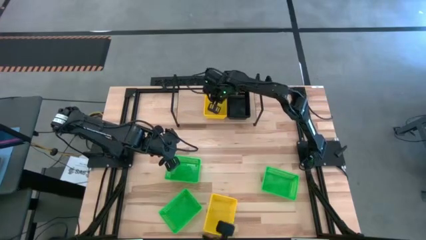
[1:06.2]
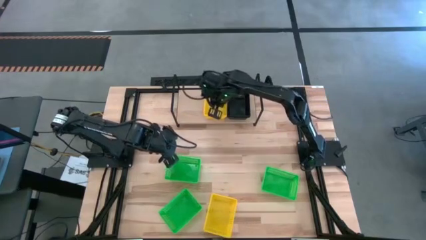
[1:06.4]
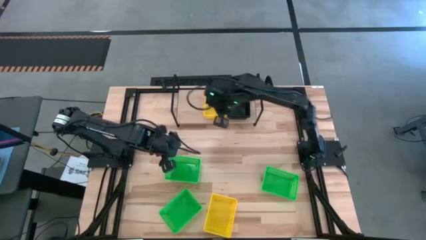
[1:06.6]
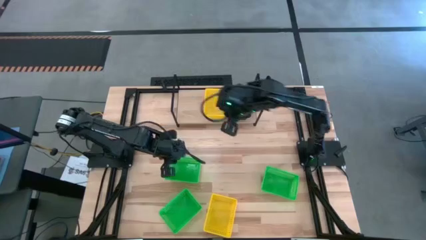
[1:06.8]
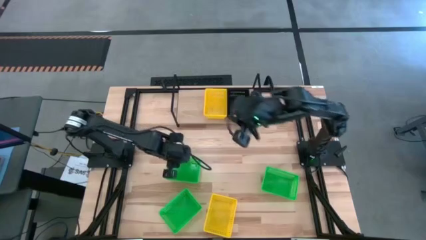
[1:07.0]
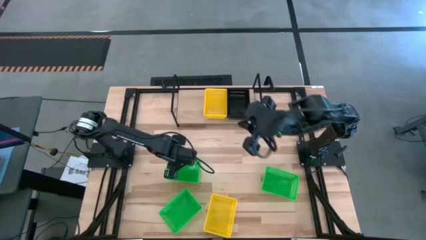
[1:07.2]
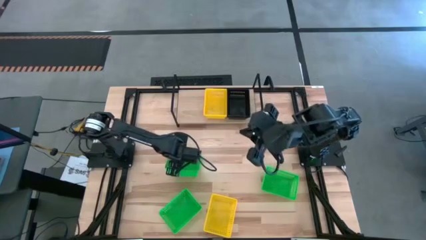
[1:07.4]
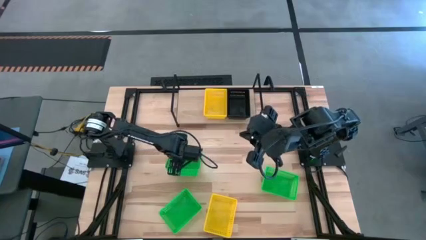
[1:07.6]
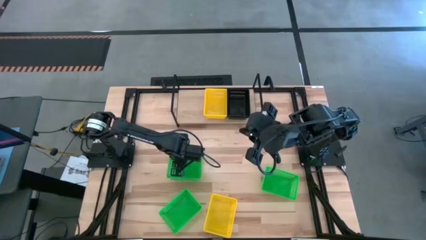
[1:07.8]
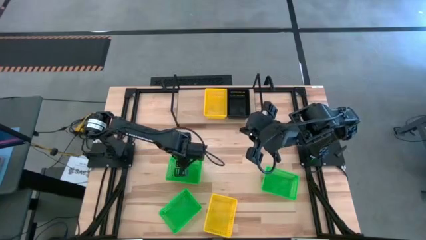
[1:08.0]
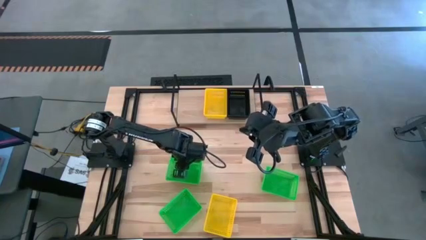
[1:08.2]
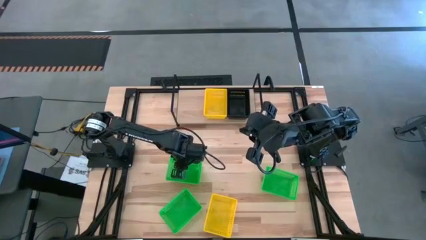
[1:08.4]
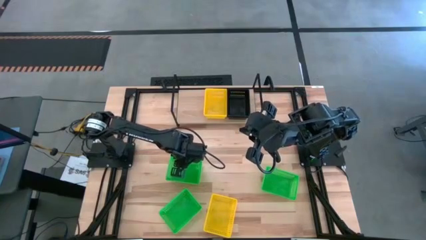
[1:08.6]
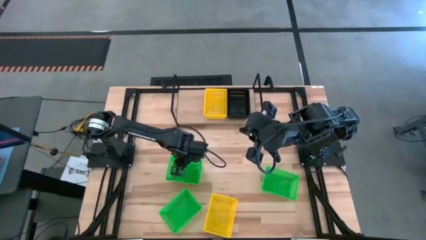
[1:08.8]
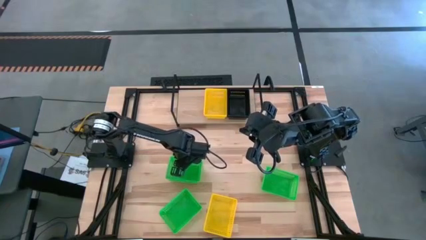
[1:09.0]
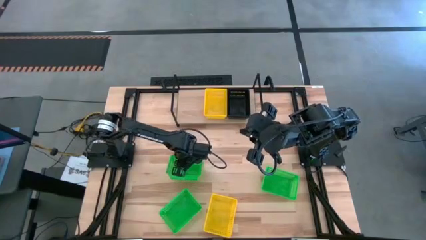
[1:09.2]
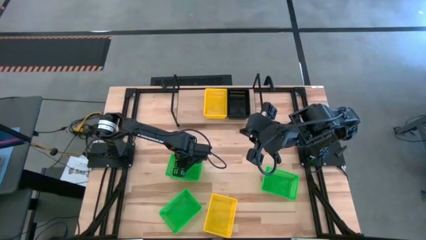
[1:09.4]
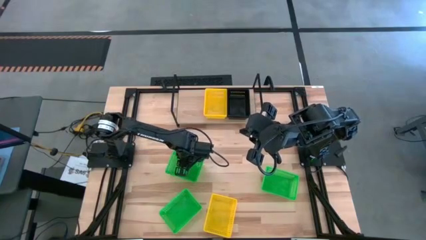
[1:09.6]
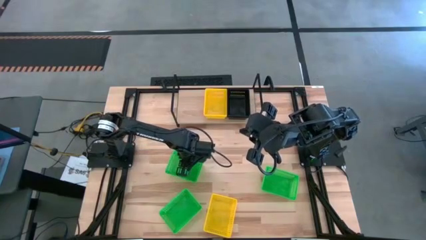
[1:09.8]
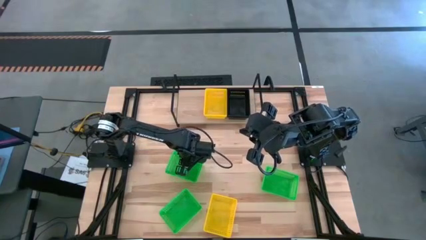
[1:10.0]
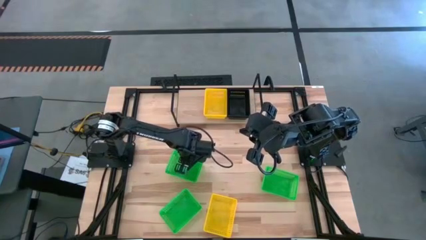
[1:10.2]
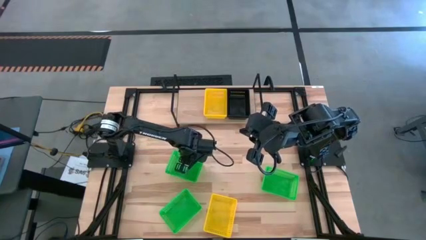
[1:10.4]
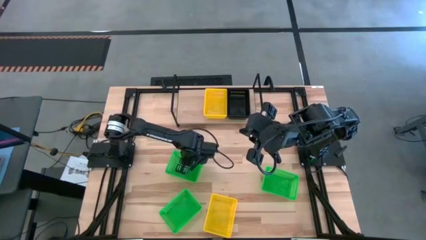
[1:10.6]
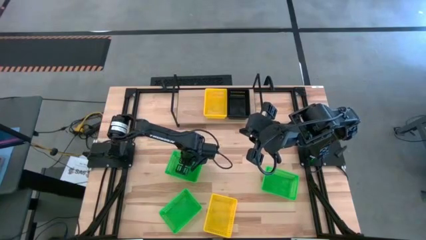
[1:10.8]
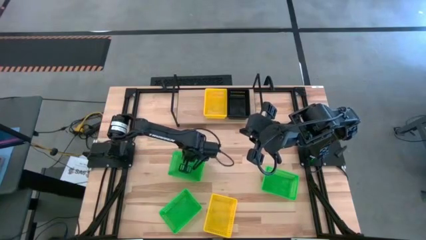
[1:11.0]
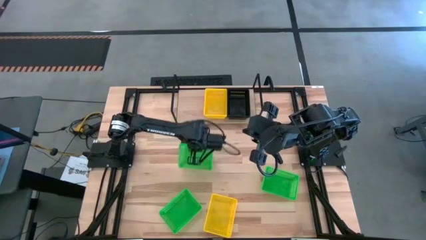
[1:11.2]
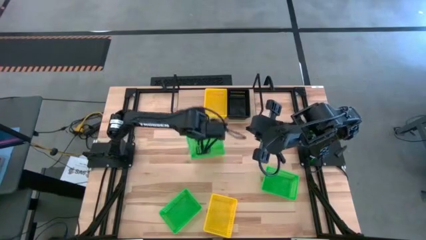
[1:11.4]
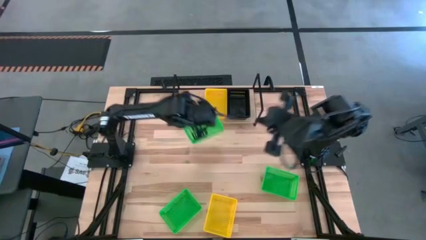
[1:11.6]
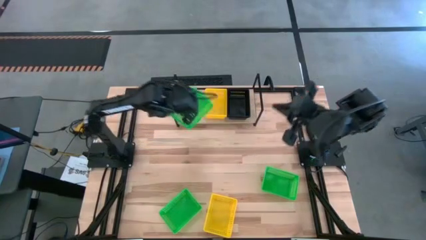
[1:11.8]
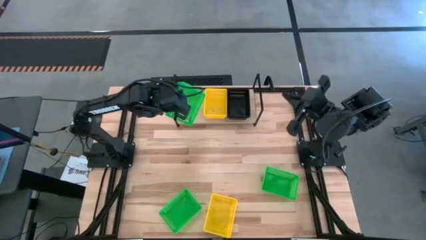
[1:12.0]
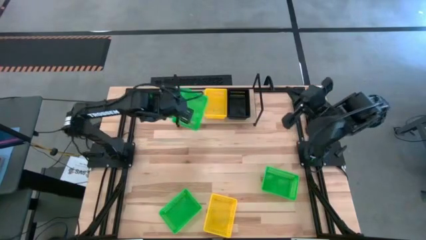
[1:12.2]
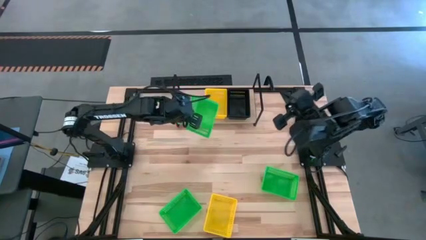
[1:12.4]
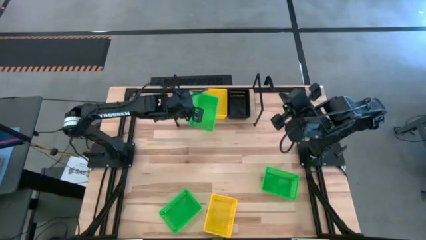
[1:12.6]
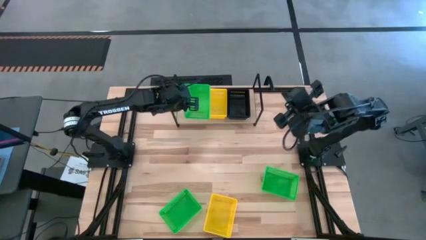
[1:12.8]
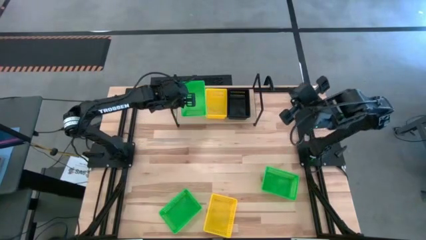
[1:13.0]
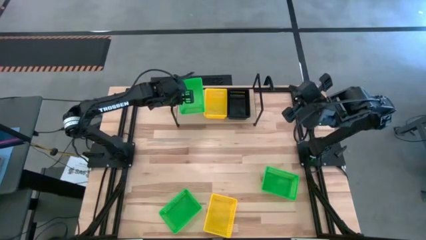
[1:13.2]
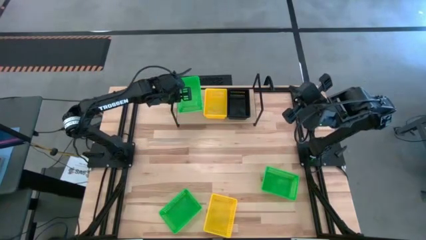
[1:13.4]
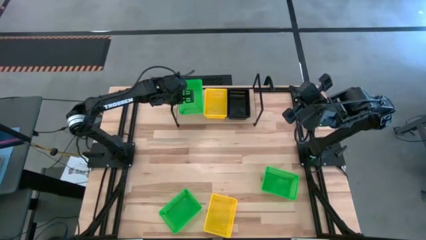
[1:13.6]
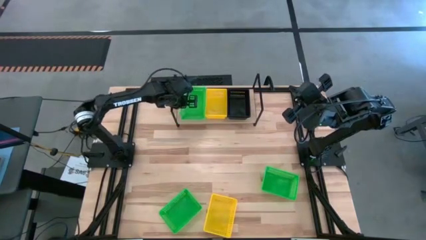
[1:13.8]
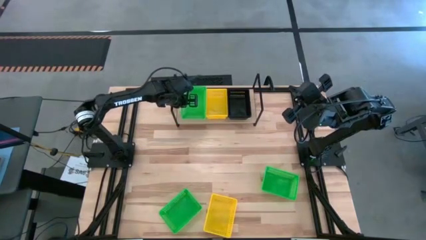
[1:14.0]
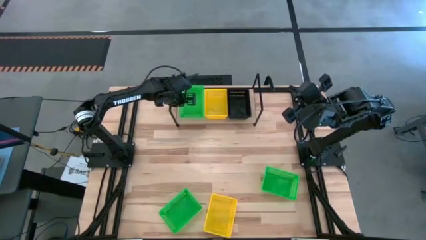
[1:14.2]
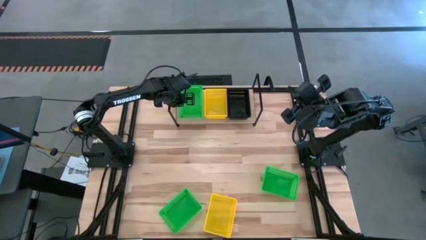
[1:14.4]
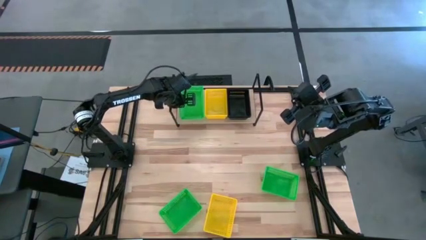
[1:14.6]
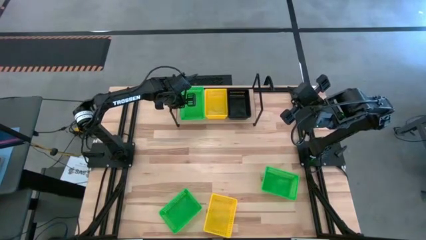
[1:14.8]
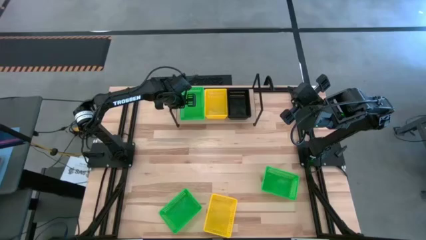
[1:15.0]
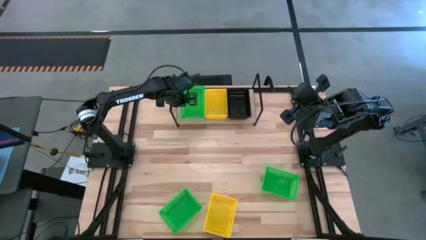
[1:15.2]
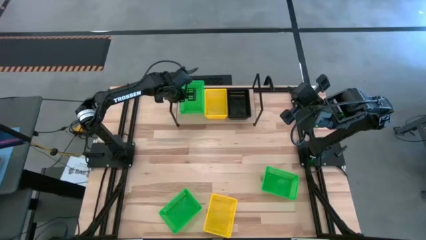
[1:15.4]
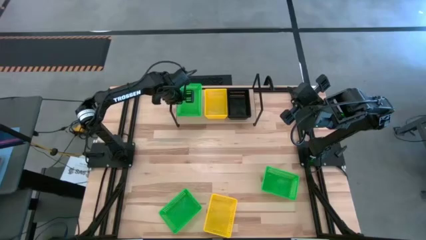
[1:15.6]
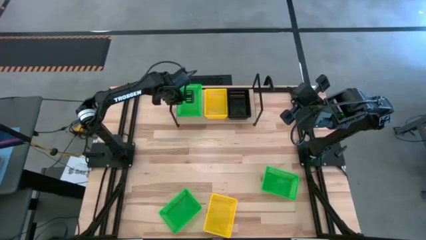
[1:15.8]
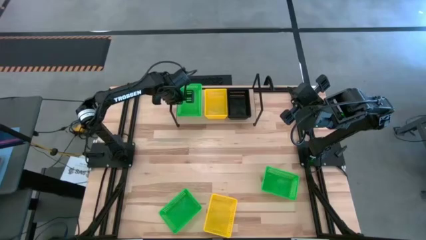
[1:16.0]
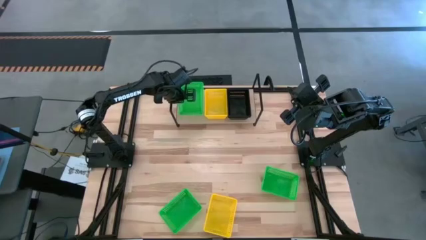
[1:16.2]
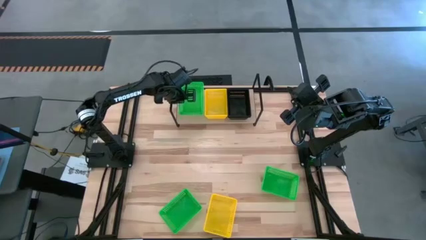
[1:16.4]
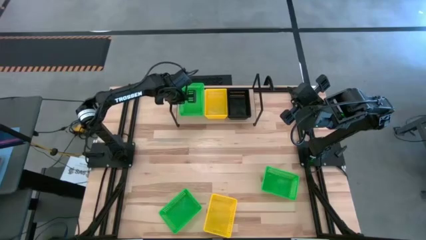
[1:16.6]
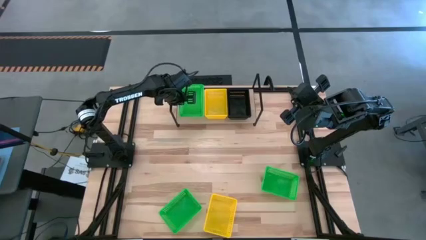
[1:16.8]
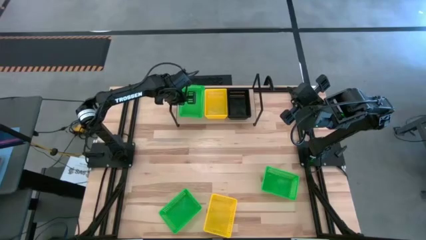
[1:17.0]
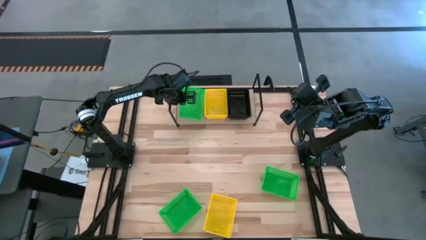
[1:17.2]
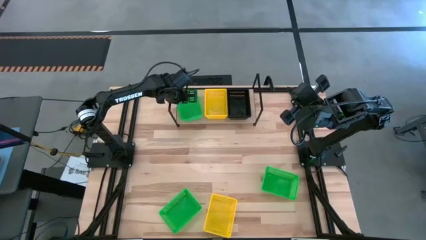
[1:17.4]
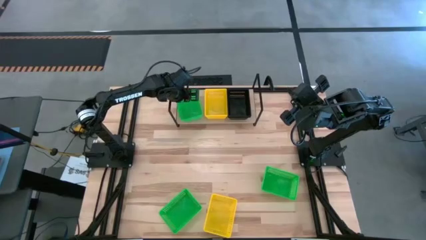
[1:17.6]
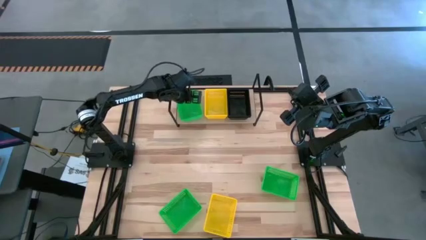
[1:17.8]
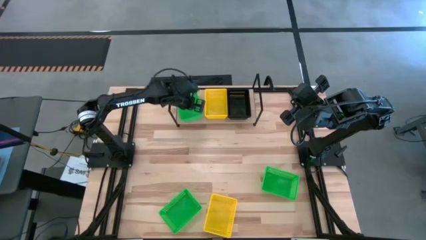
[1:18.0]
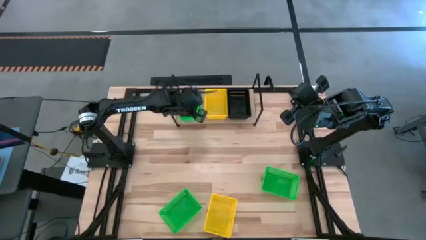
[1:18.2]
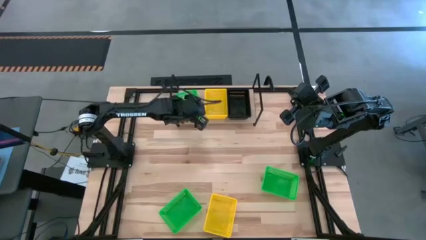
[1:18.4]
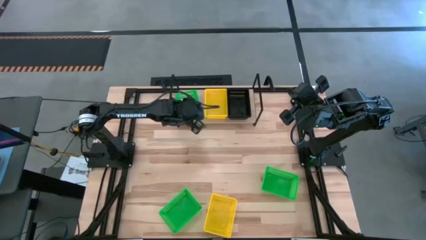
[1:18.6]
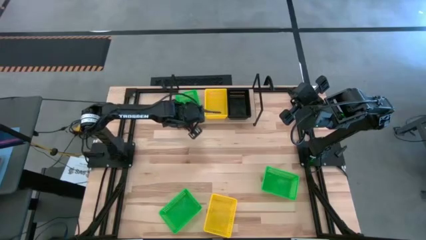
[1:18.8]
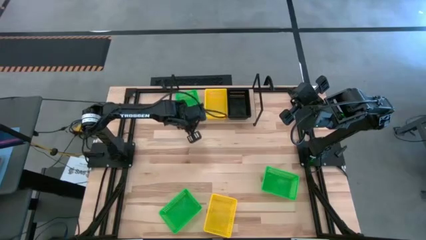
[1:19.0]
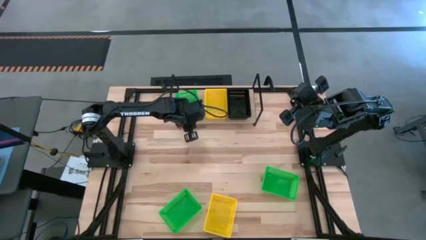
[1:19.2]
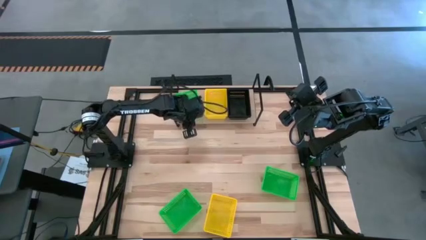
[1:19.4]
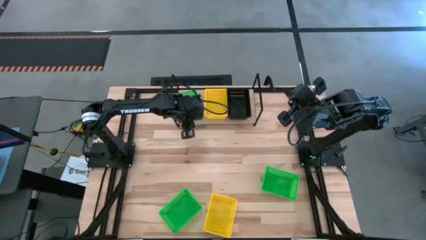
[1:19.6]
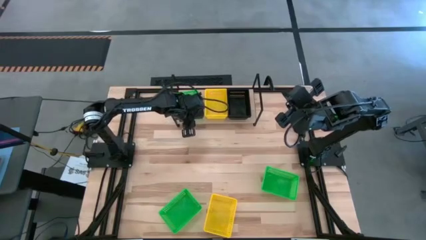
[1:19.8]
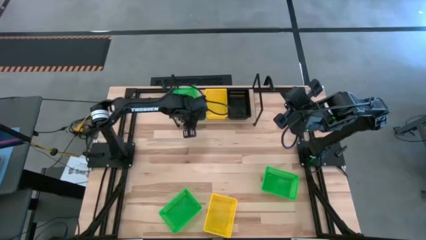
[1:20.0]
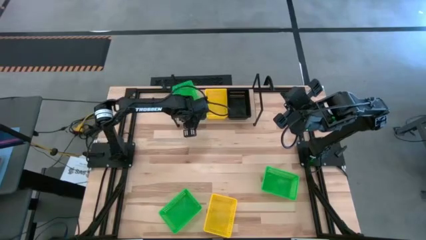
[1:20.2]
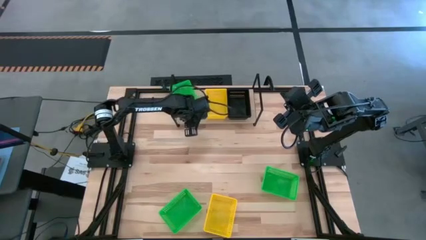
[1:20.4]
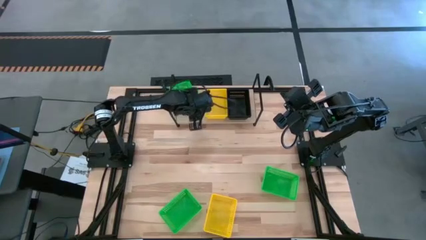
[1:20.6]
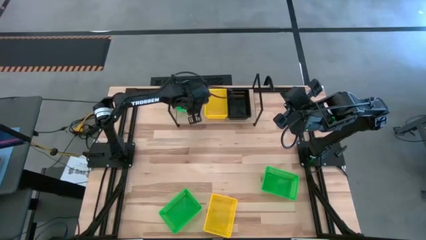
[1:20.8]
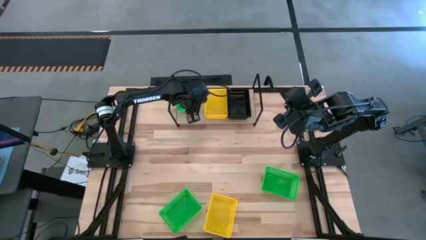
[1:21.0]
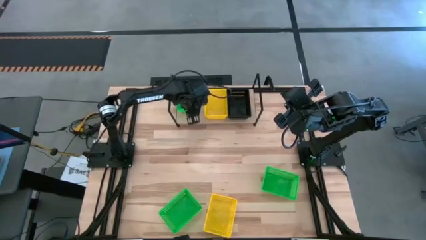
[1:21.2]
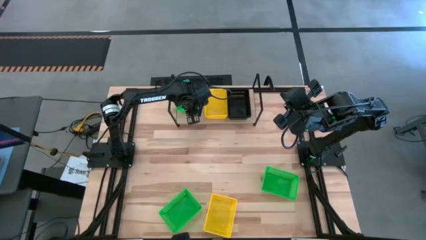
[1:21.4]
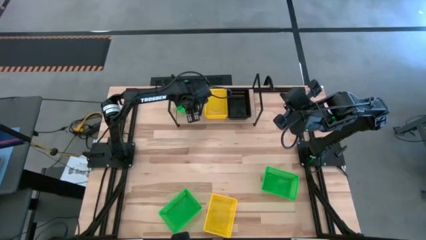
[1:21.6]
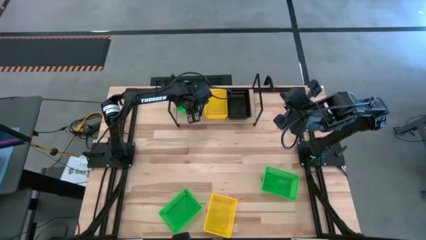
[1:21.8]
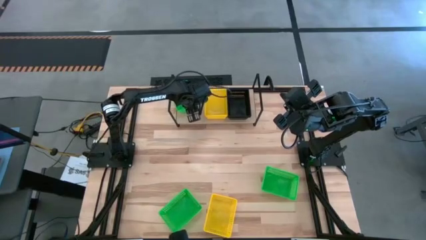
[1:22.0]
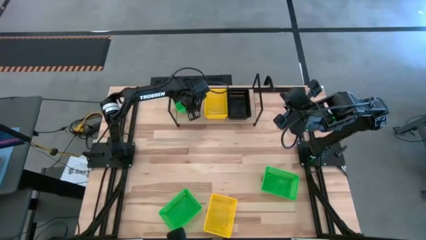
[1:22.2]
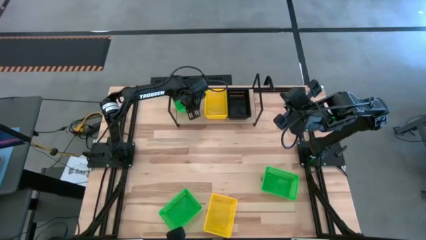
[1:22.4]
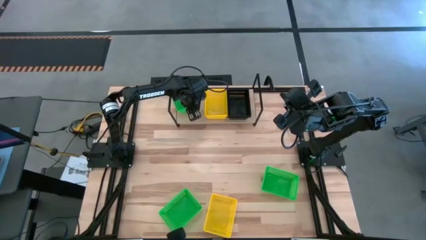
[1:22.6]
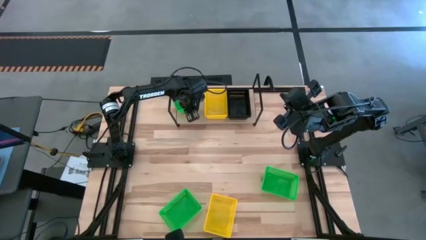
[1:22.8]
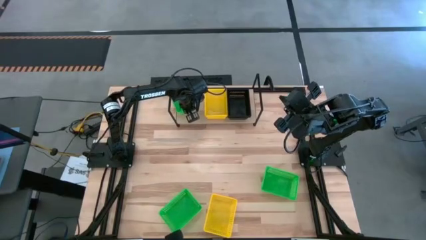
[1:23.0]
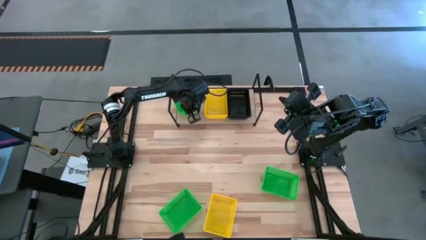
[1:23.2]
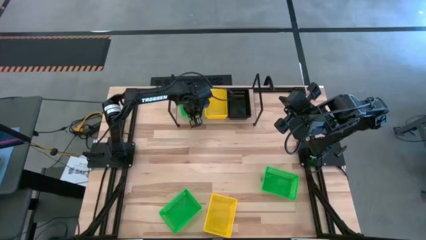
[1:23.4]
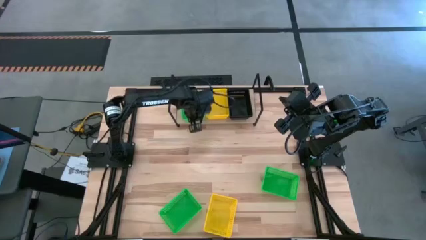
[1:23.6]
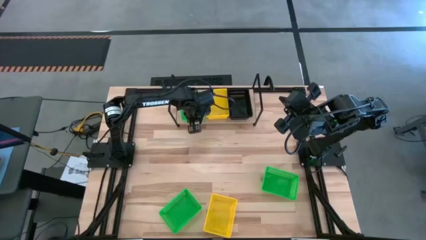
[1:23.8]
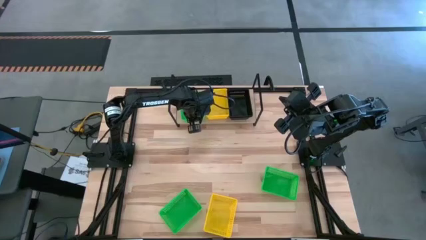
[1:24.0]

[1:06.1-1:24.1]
Task: Stack baskets on shelf by color
Put the top left green bin on the shelf
